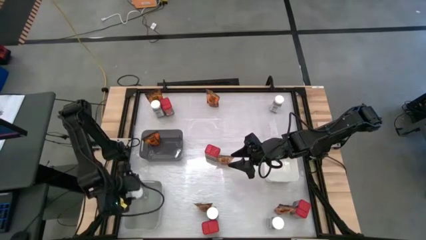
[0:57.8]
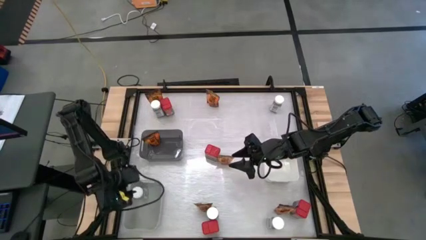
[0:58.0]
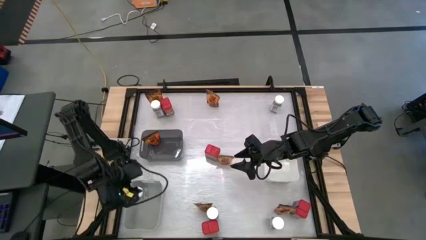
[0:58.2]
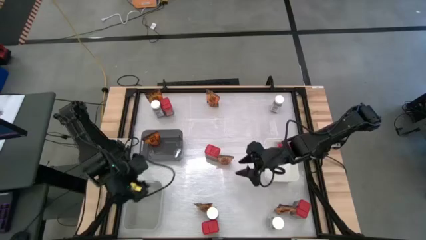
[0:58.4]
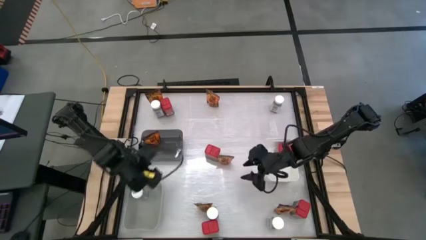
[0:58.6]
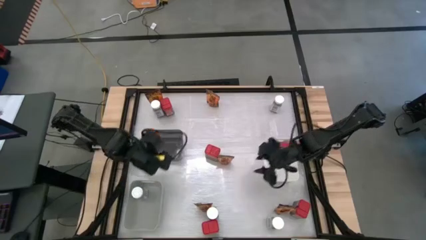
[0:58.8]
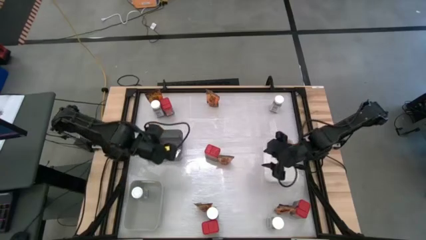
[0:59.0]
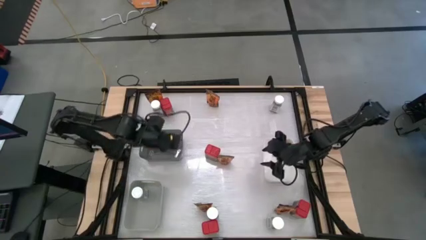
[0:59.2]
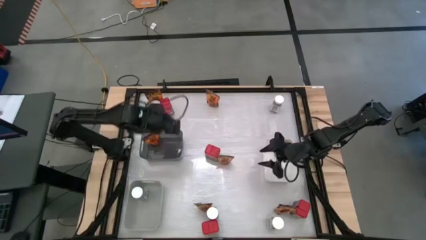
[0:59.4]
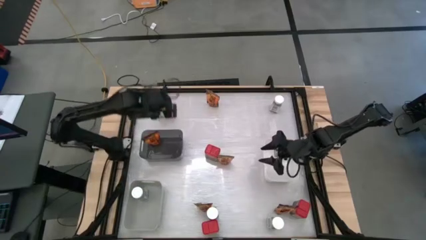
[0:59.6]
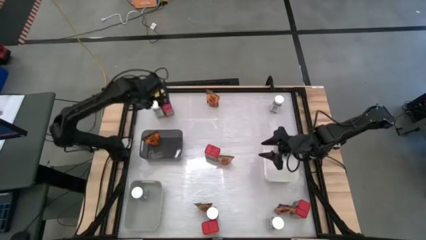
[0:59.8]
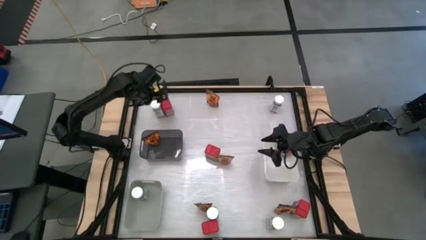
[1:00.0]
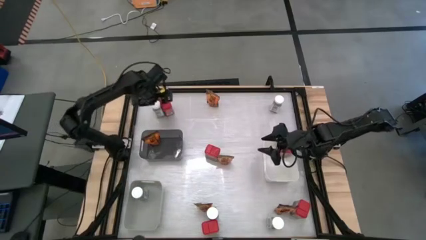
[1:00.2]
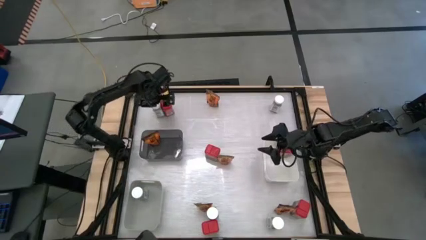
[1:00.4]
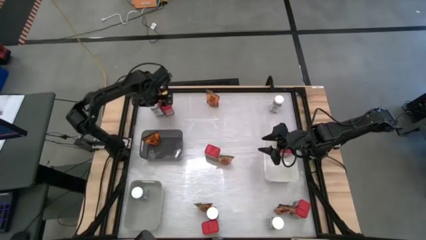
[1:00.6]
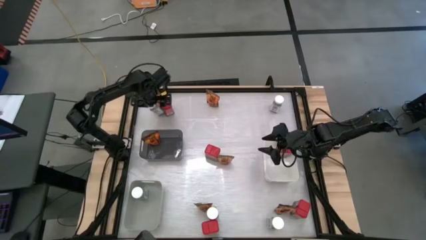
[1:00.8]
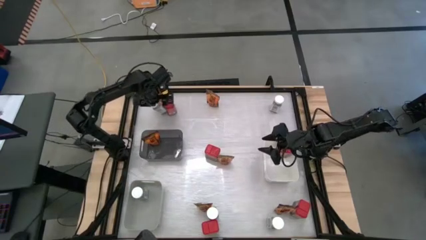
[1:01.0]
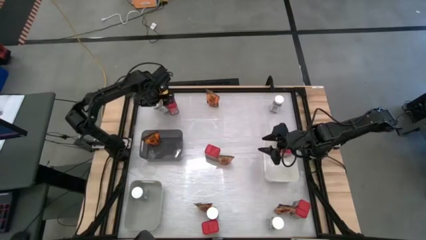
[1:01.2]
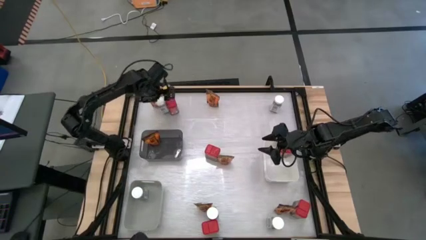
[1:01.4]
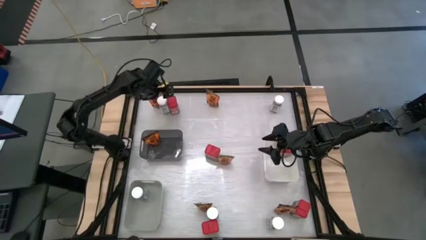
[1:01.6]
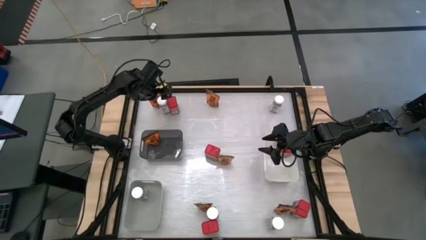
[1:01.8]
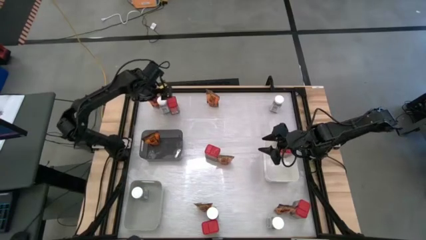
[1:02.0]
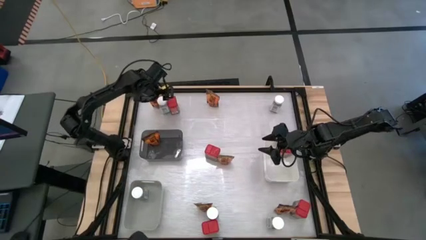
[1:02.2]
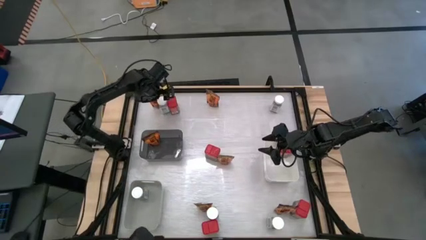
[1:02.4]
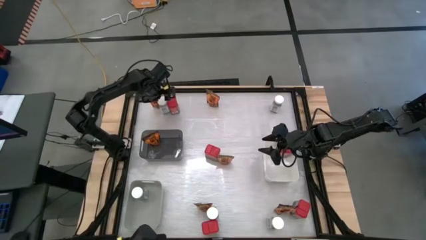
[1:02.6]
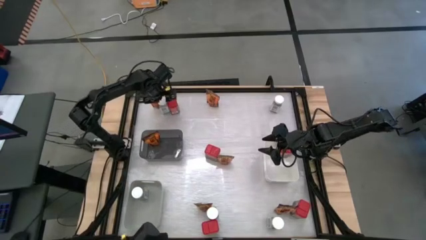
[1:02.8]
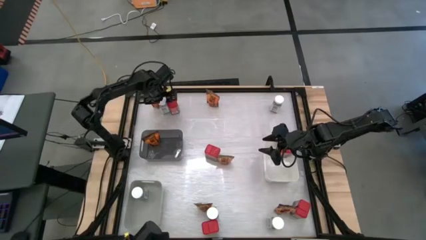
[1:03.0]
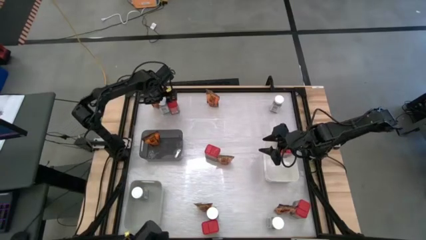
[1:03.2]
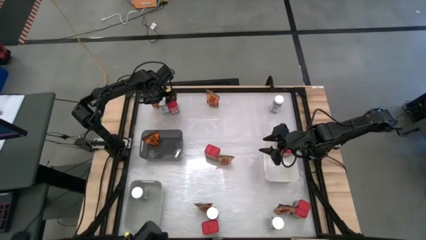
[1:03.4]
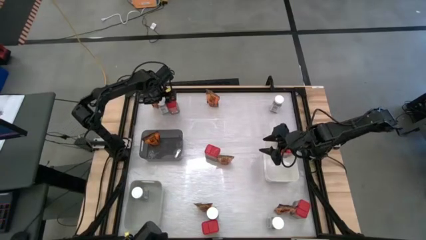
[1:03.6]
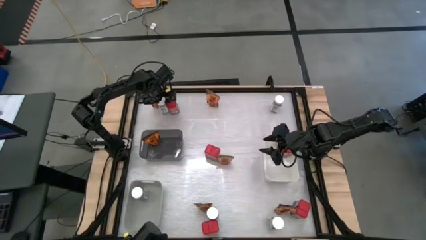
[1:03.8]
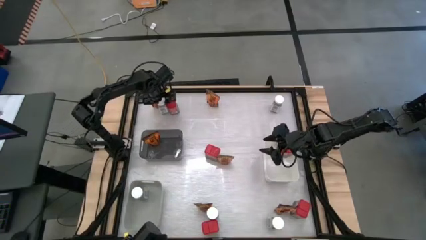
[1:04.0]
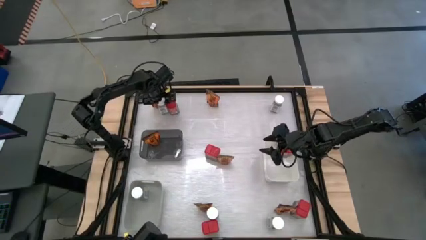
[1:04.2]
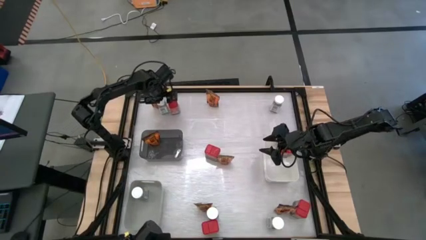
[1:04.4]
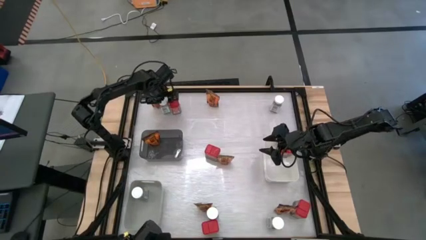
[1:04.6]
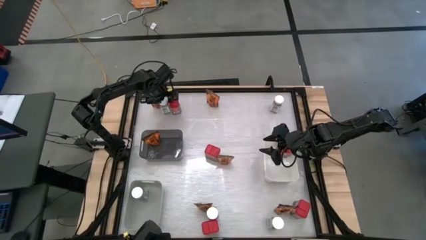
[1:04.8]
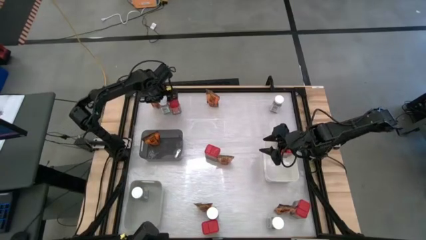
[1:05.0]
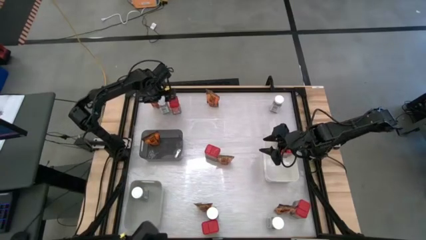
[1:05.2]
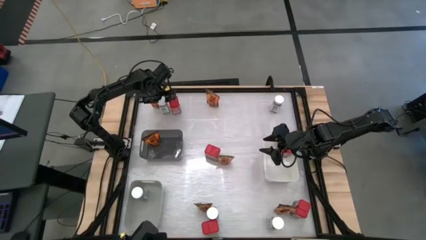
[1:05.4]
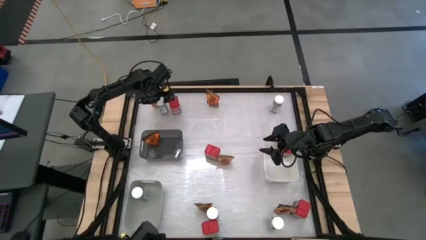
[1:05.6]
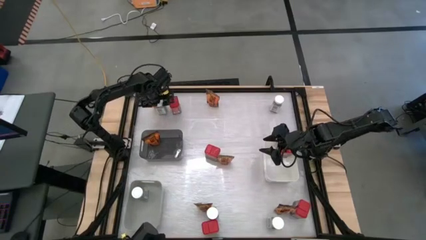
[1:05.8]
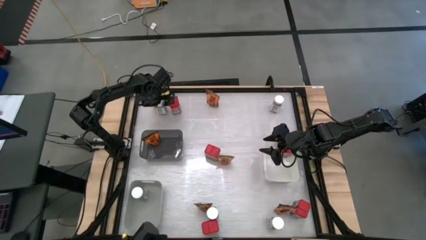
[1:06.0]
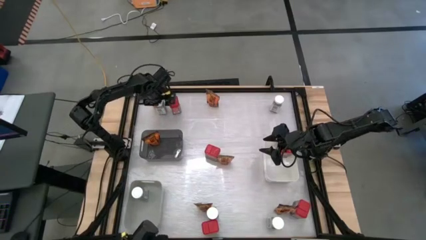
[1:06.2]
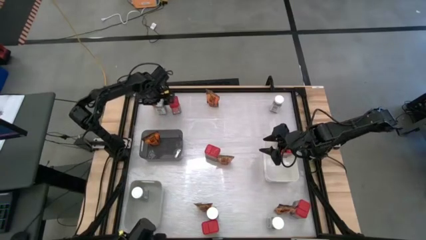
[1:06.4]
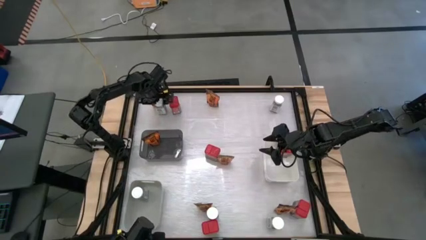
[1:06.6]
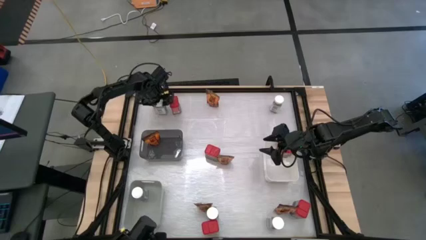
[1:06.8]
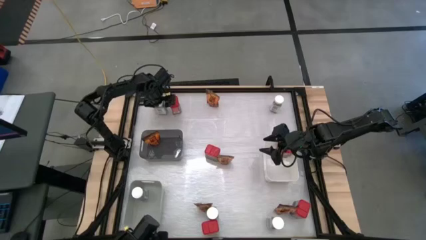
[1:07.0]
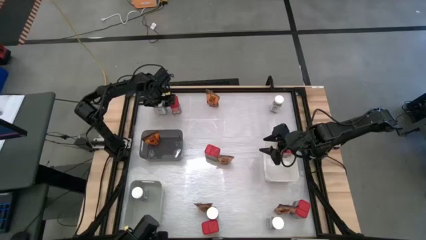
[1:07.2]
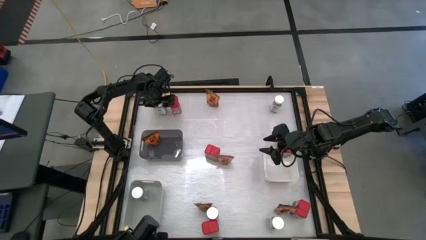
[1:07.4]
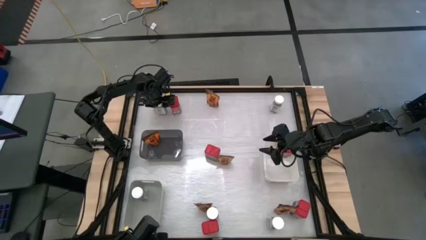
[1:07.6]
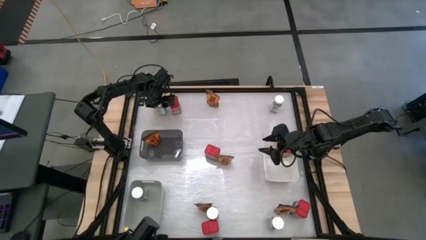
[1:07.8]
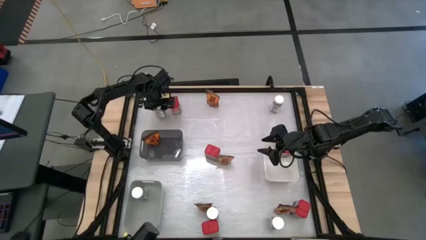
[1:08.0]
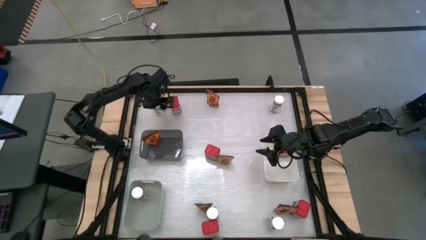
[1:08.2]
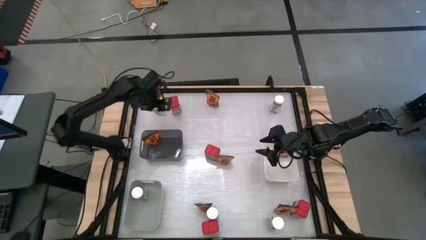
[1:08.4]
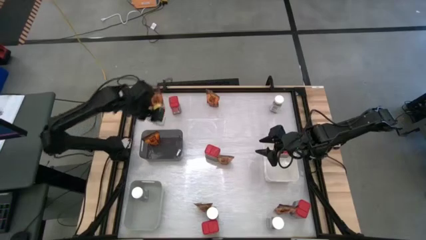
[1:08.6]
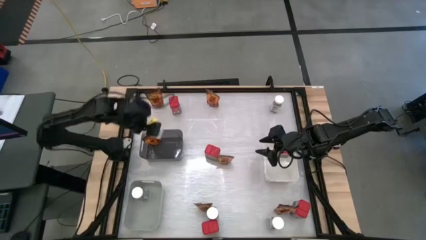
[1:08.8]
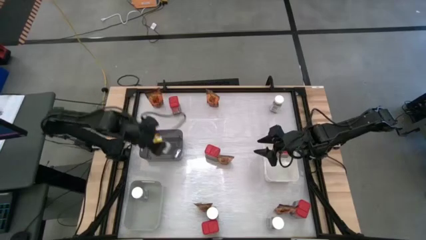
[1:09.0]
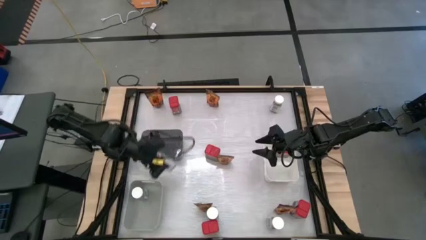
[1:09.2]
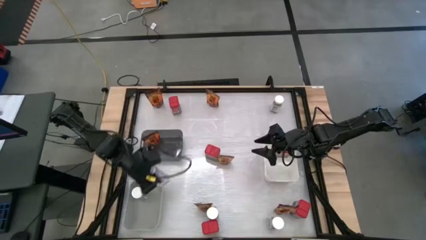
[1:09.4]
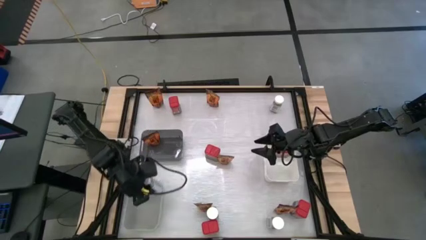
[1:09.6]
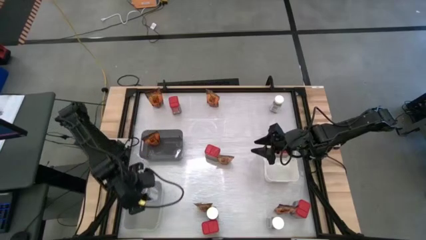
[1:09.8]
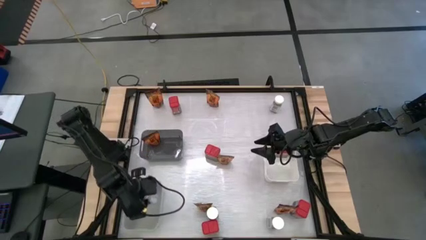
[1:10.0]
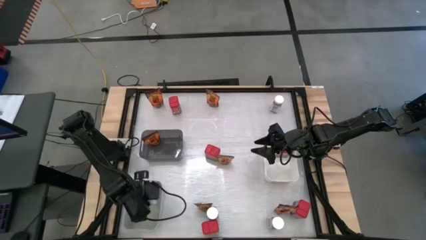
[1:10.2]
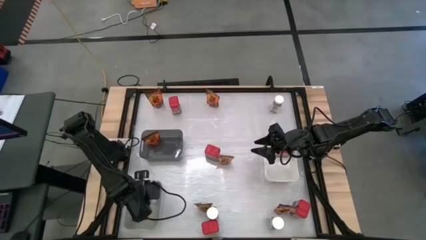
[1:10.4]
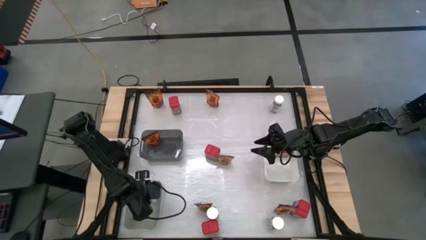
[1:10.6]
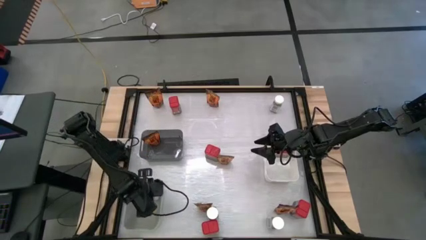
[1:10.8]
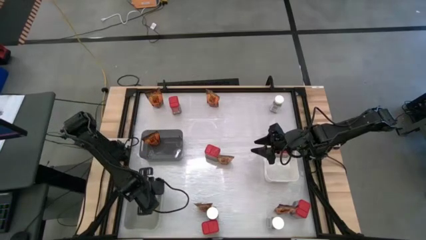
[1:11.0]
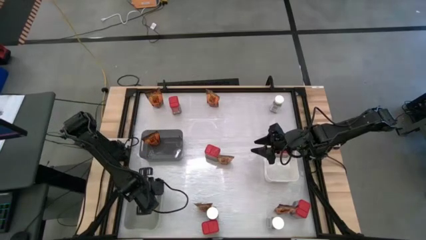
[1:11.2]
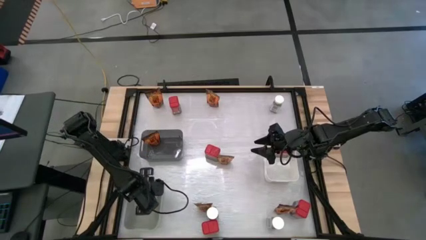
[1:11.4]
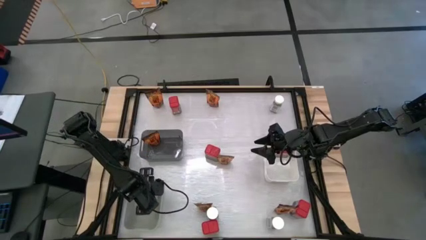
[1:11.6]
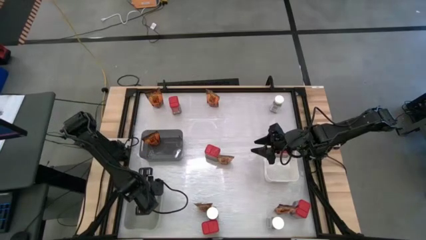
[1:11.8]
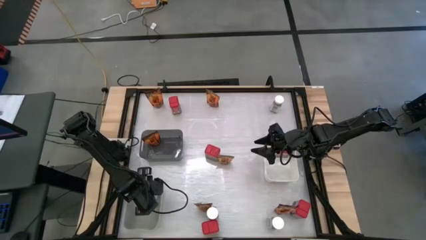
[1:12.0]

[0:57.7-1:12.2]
Task: Sort spices by type
Put the white spice bottle into the gray bin
